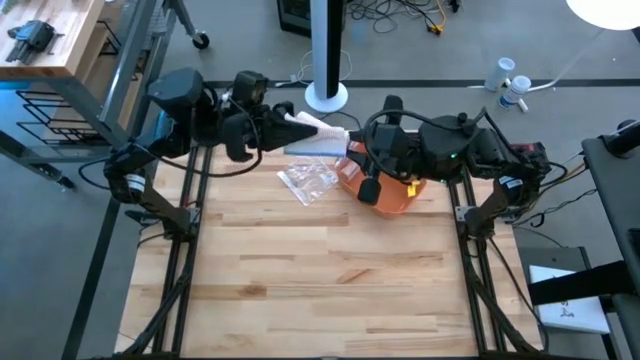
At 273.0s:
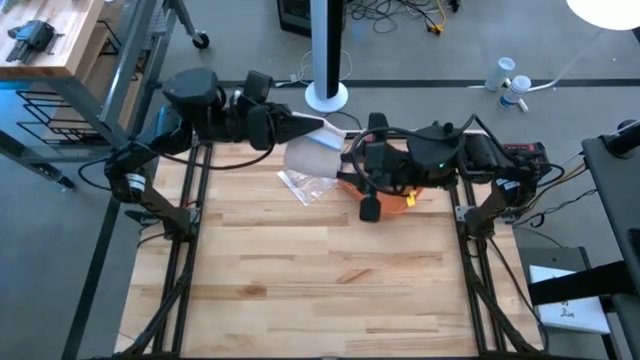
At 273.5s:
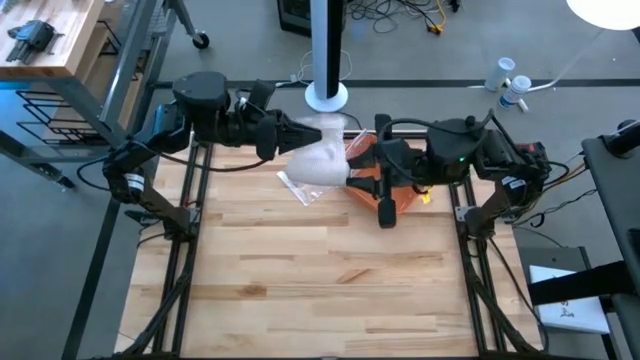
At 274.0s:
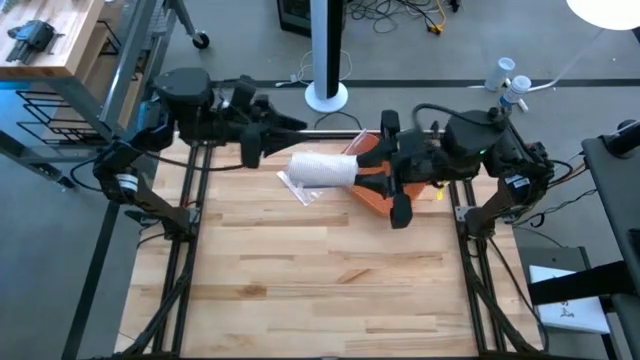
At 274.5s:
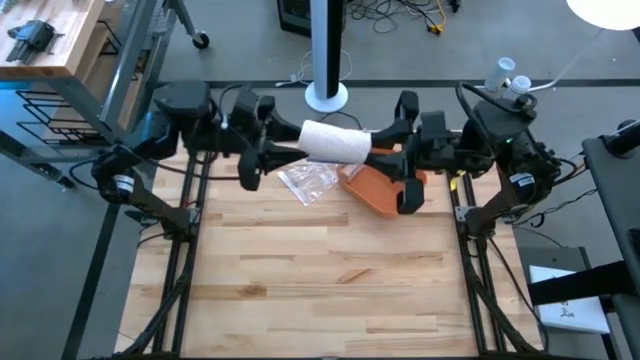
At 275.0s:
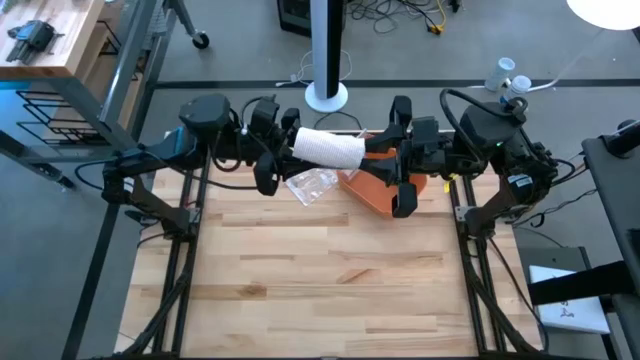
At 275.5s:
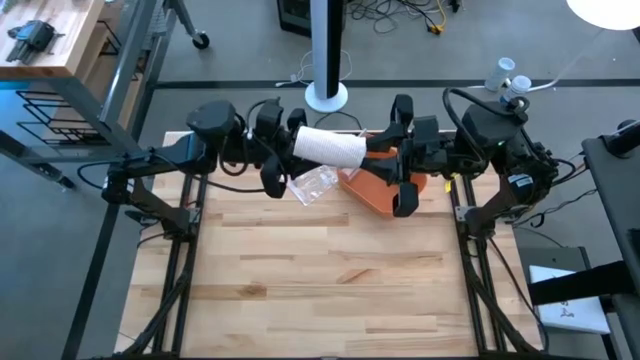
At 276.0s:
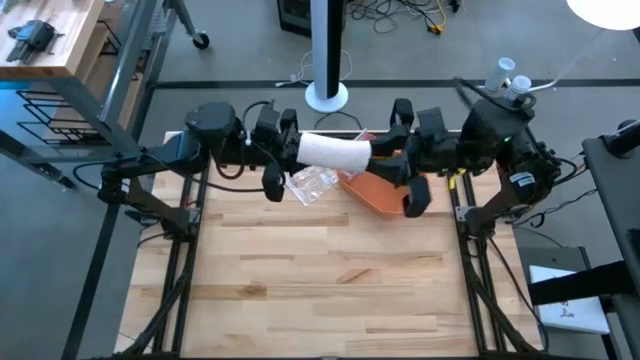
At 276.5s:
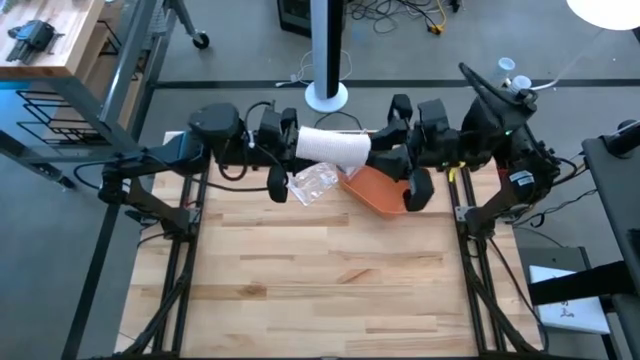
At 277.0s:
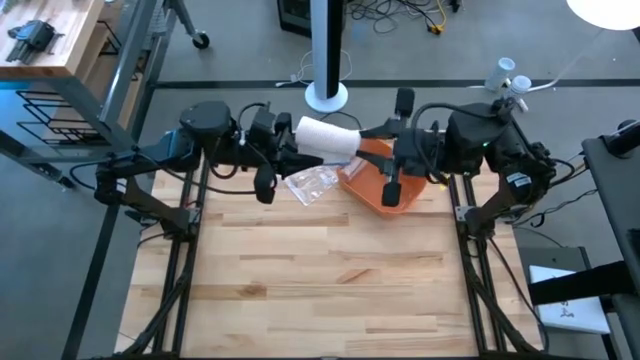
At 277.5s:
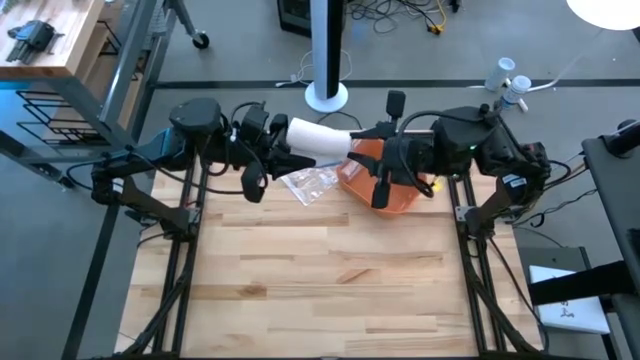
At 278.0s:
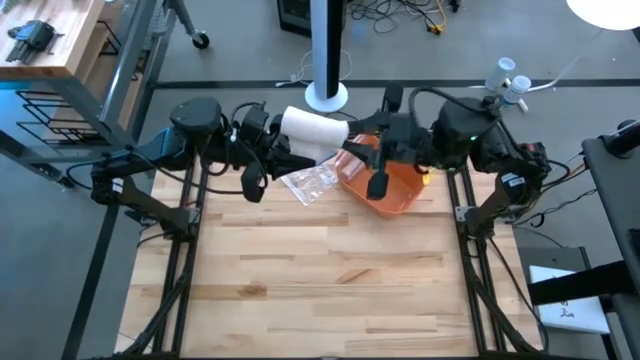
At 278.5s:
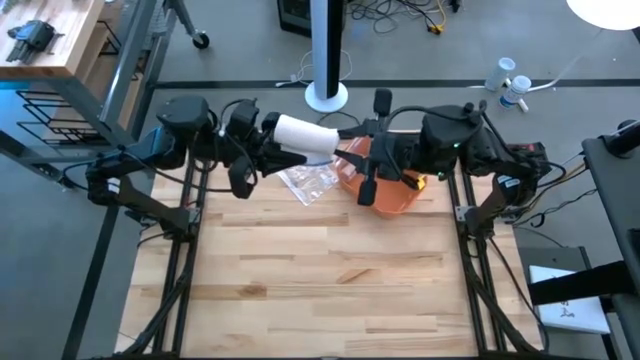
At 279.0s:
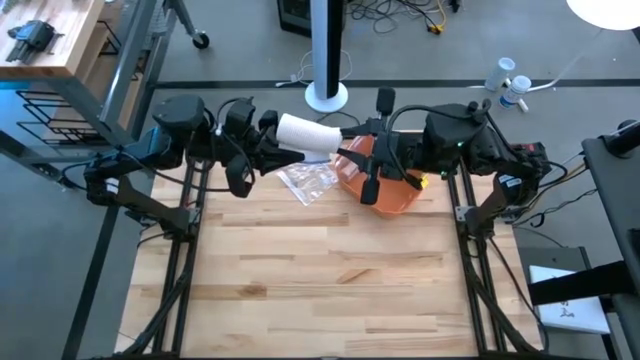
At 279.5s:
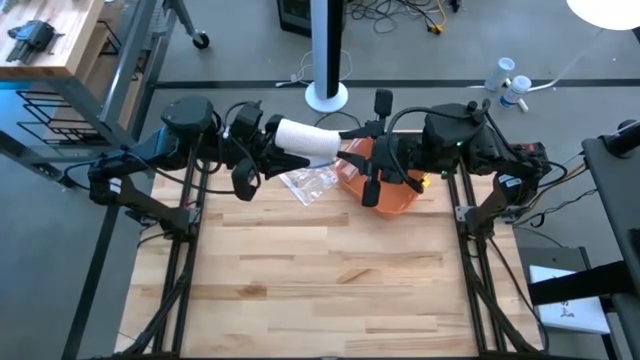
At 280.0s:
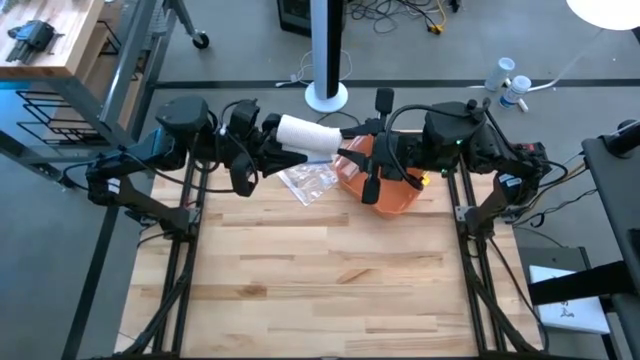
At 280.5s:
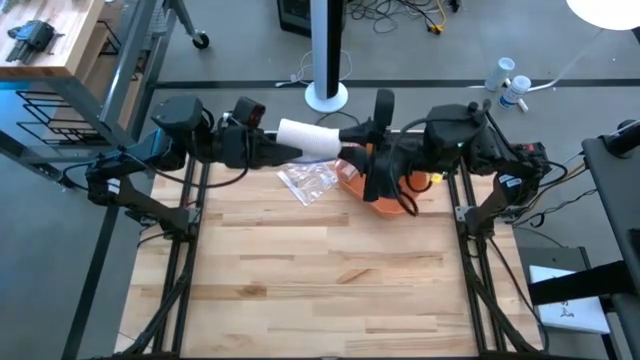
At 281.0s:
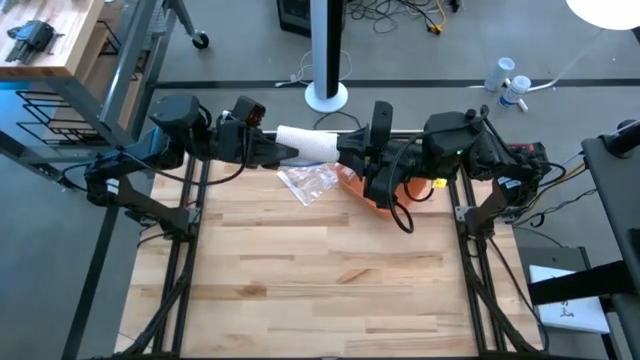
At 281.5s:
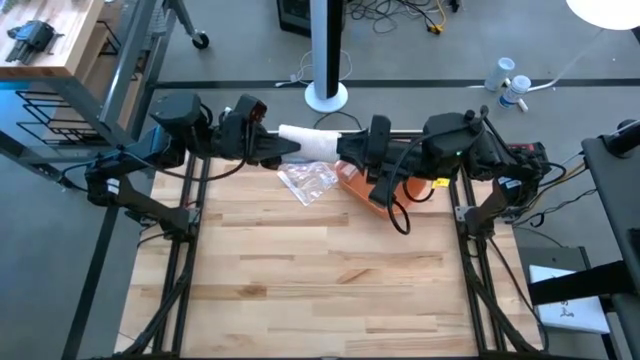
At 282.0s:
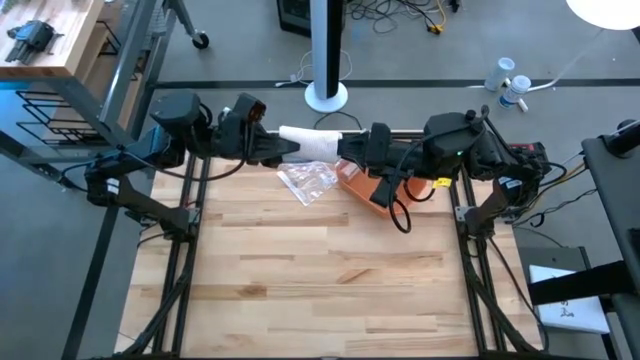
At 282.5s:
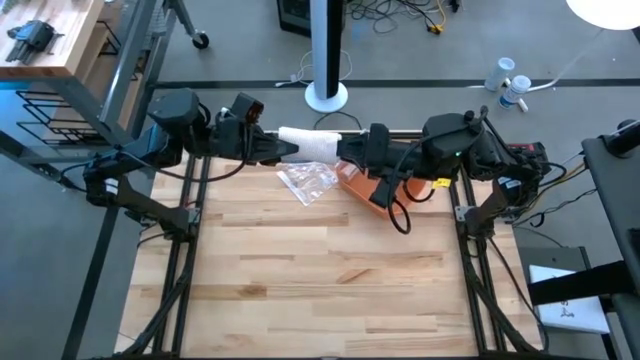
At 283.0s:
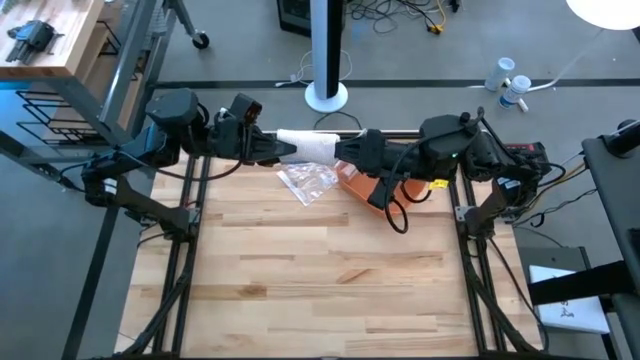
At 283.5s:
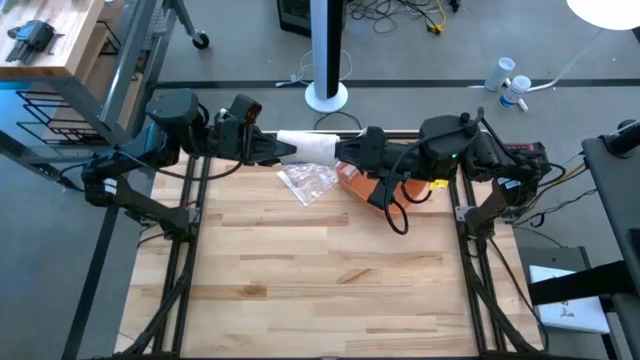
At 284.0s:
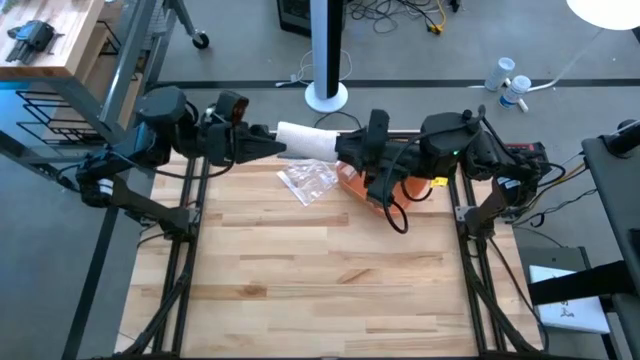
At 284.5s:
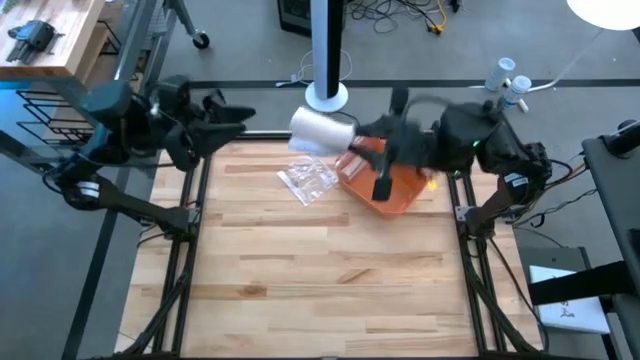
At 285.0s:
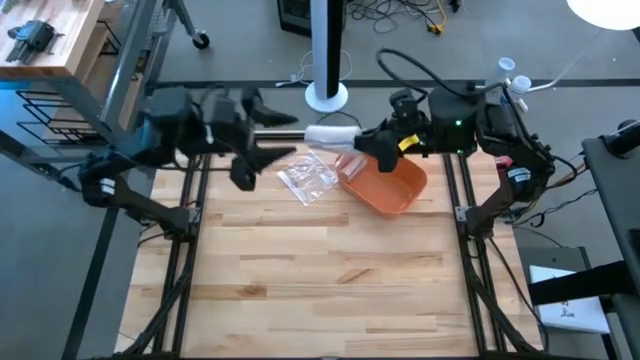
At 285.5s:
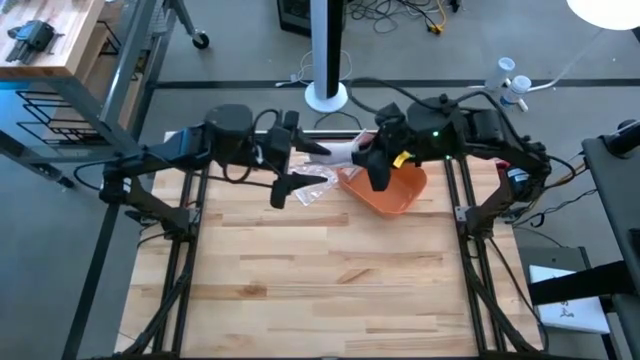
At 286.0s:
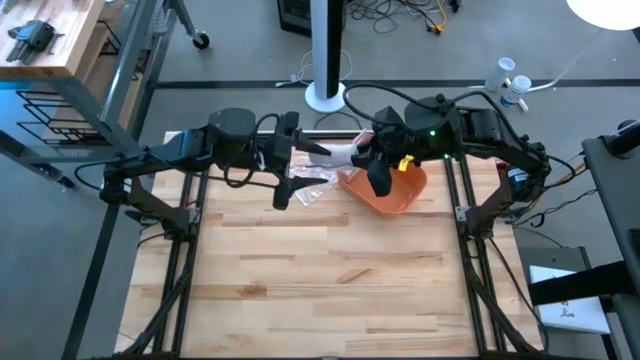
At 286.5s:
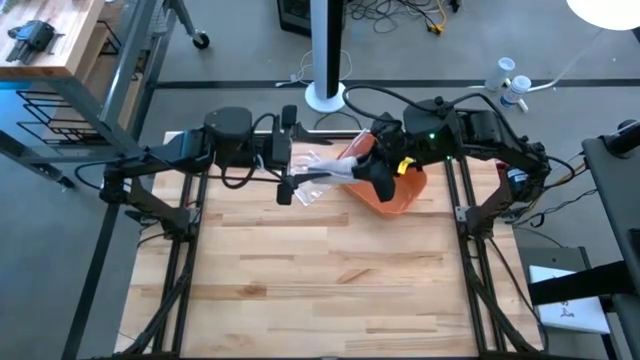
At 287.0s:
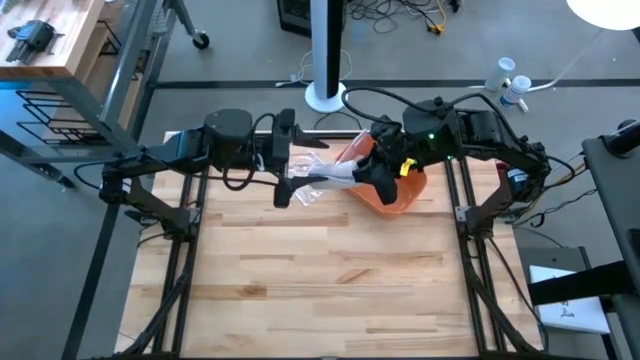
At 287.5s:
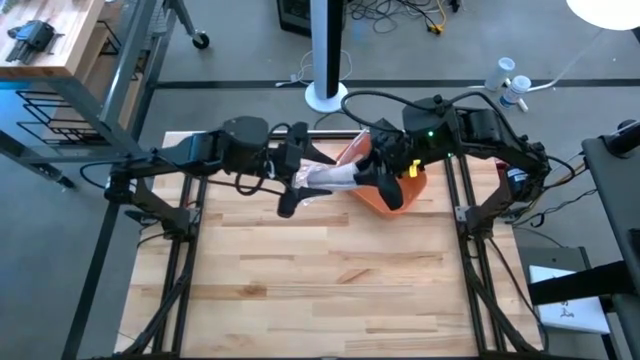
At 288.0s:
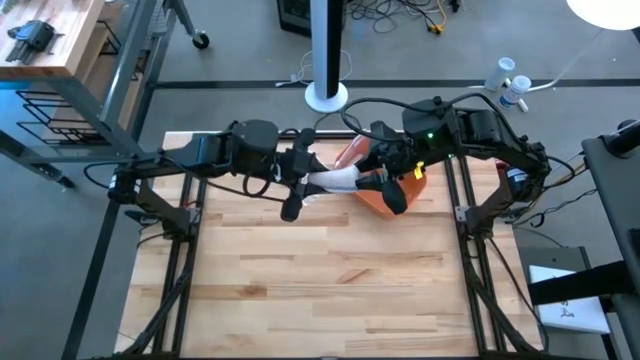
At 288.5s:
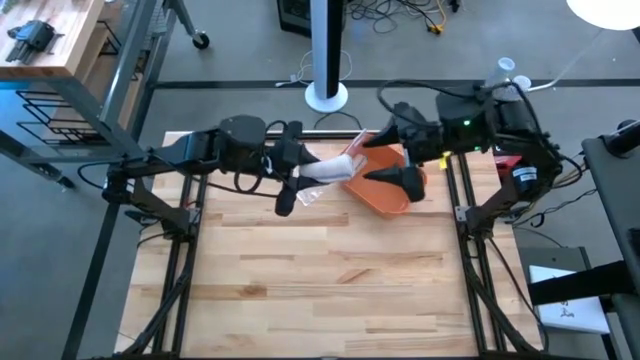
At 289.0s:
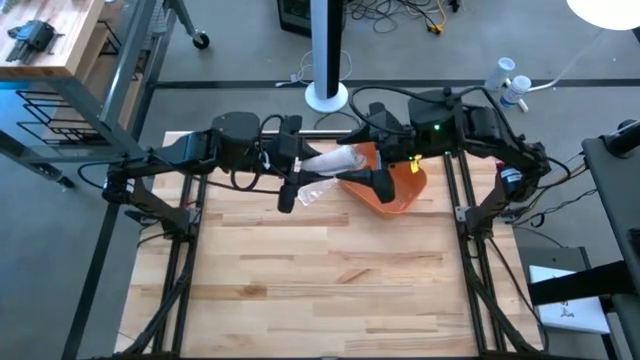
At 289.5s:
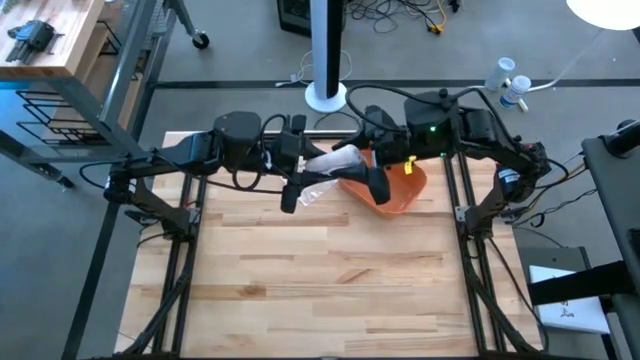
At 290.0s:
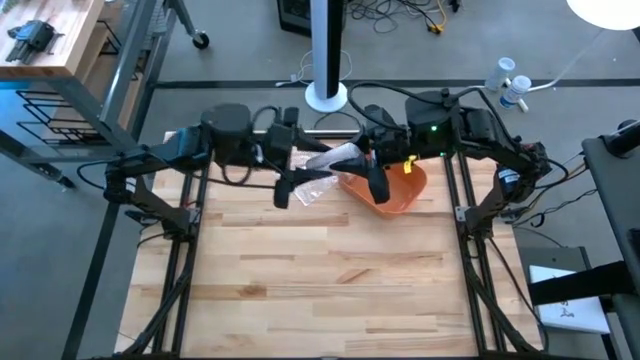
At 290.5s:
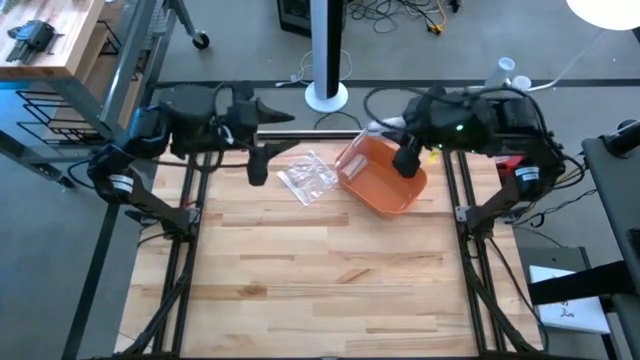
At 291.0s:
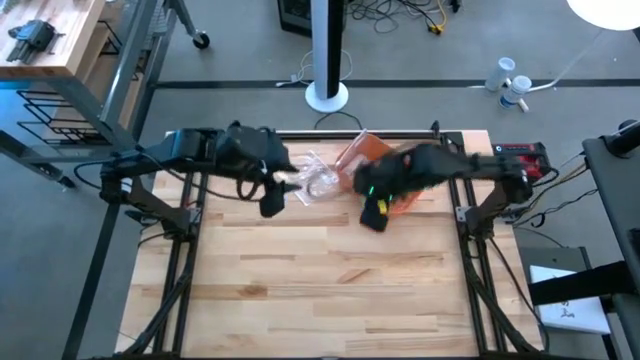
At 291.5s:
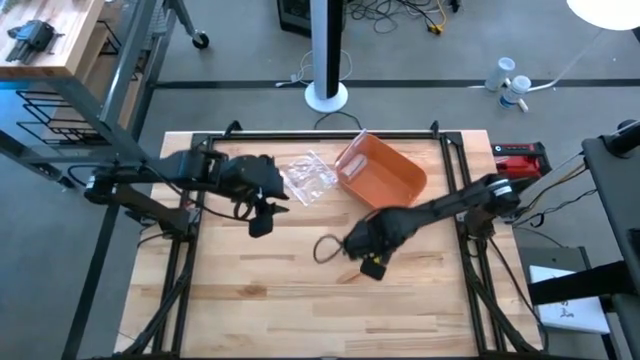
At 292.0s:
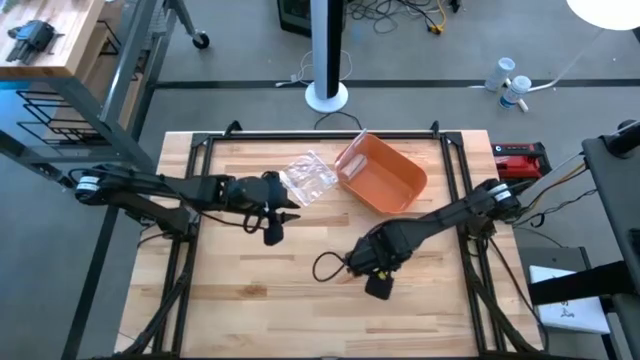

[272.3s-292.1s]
Task: Roll bandage
Roll the brown bandage
